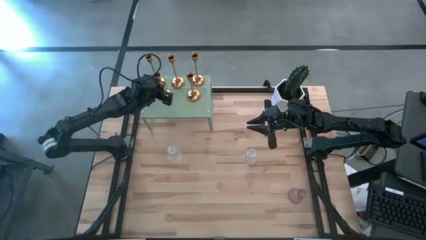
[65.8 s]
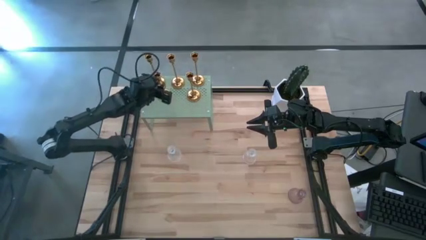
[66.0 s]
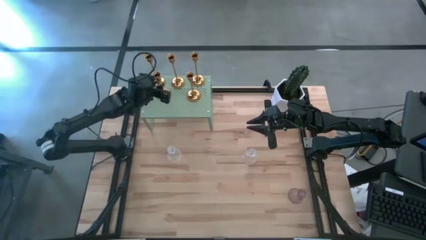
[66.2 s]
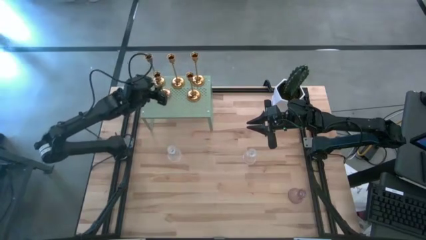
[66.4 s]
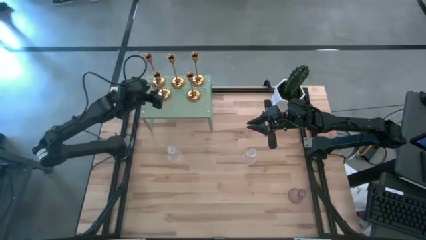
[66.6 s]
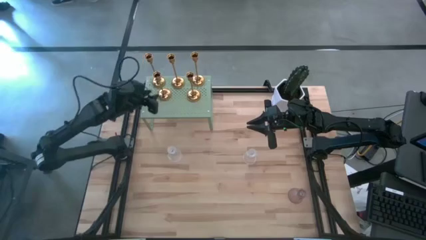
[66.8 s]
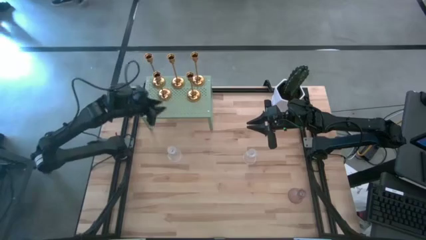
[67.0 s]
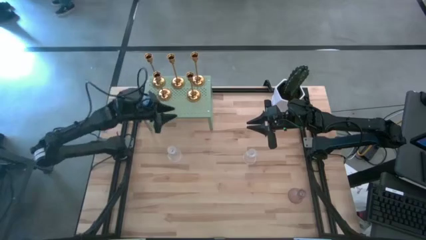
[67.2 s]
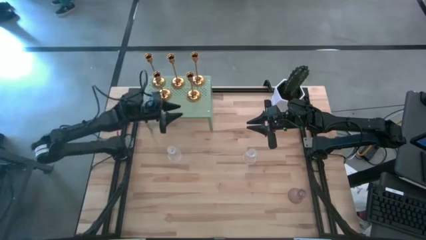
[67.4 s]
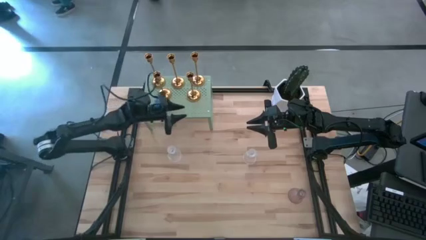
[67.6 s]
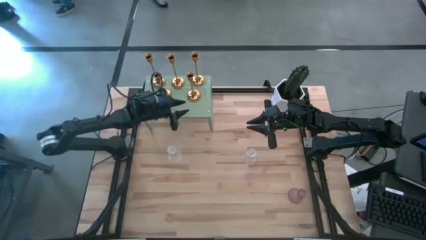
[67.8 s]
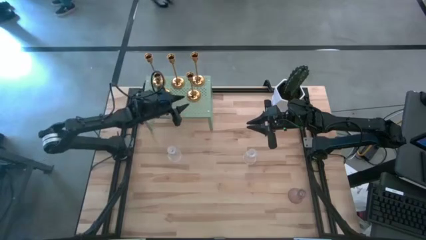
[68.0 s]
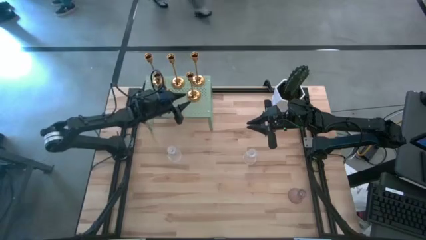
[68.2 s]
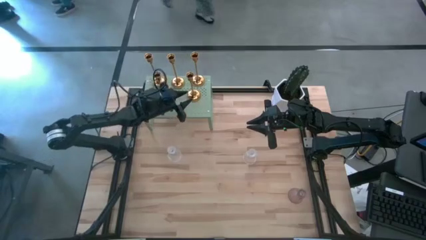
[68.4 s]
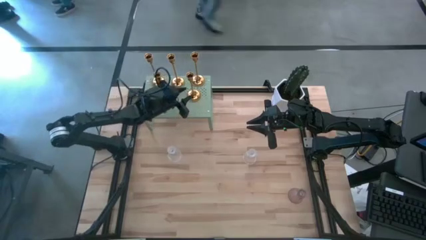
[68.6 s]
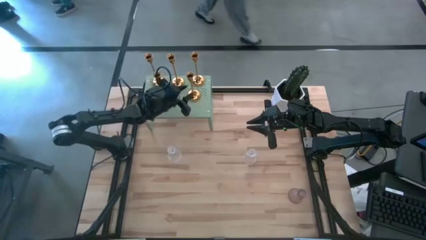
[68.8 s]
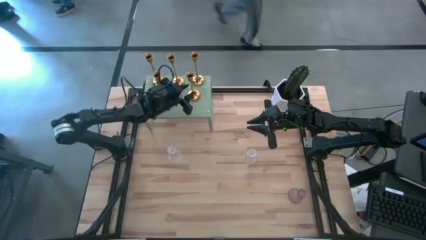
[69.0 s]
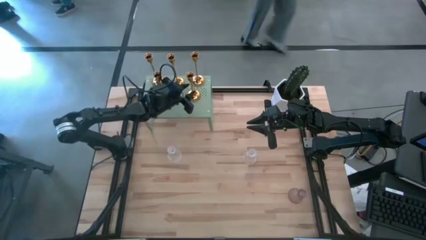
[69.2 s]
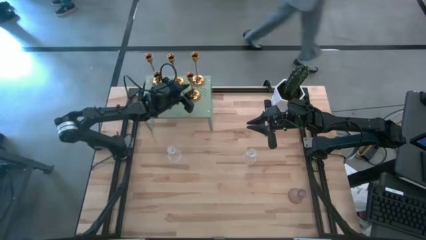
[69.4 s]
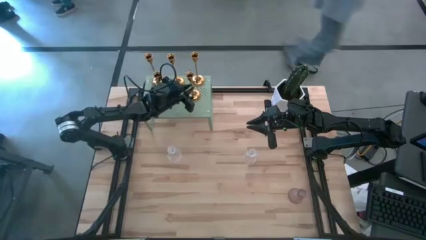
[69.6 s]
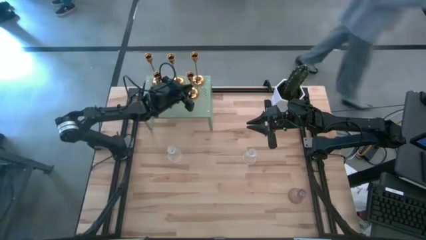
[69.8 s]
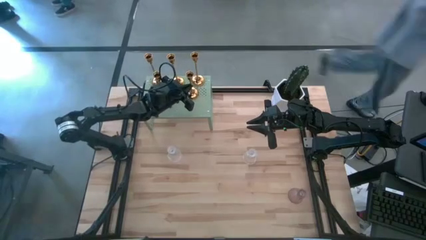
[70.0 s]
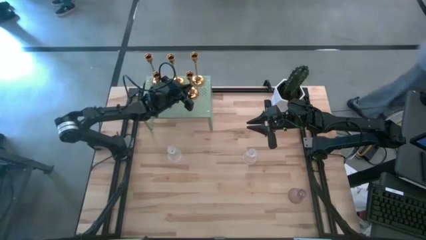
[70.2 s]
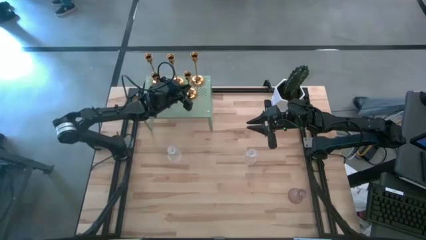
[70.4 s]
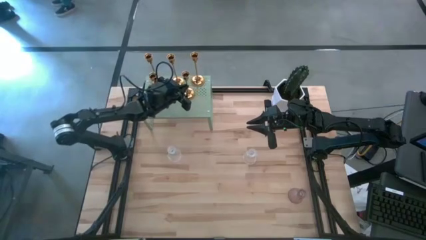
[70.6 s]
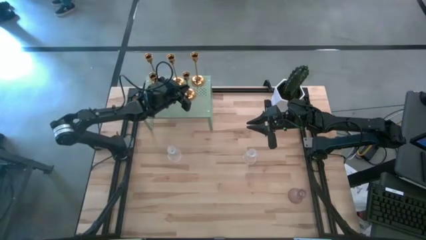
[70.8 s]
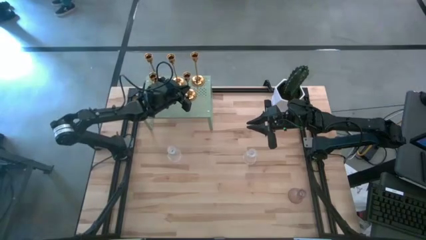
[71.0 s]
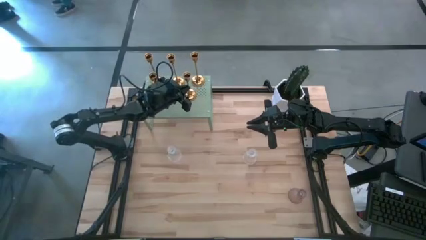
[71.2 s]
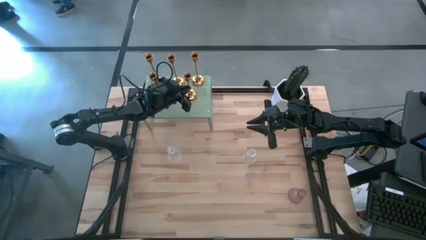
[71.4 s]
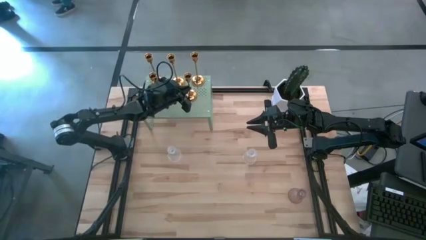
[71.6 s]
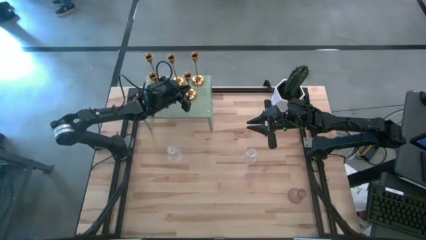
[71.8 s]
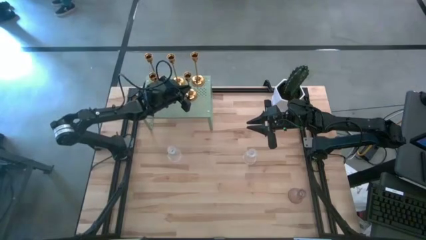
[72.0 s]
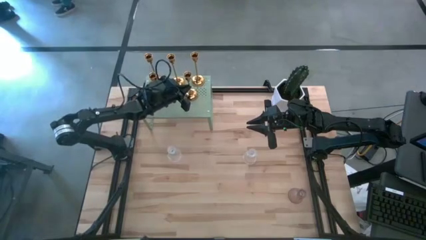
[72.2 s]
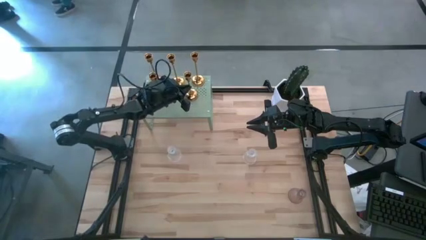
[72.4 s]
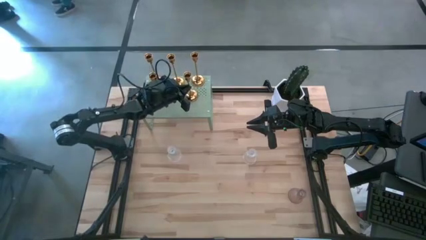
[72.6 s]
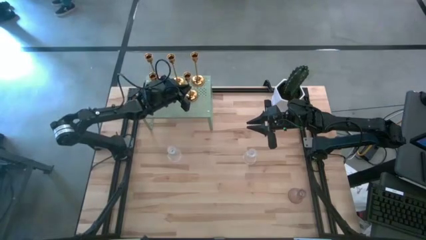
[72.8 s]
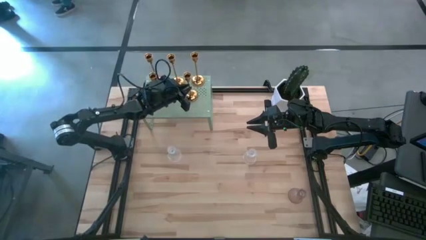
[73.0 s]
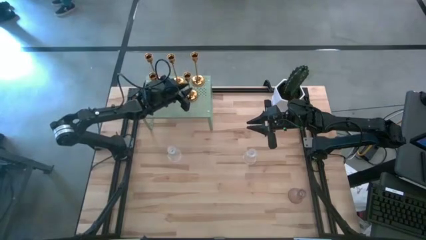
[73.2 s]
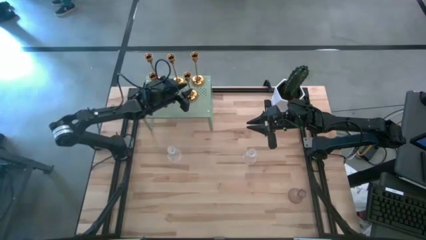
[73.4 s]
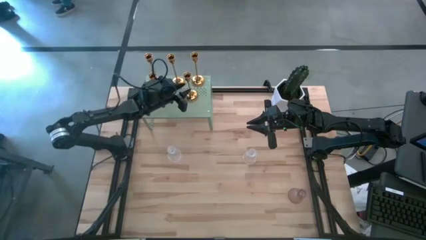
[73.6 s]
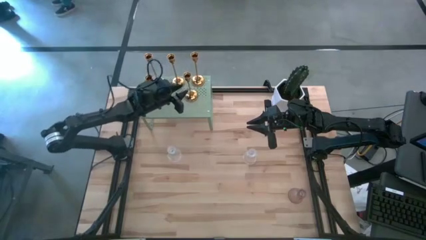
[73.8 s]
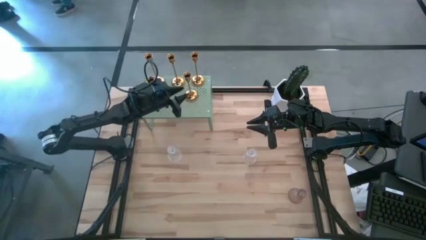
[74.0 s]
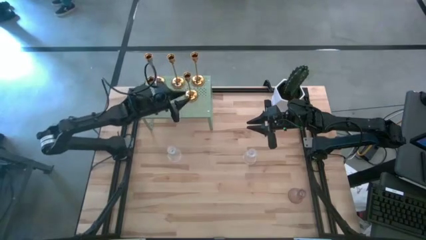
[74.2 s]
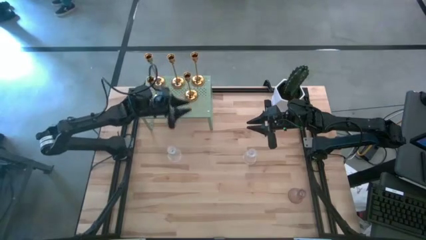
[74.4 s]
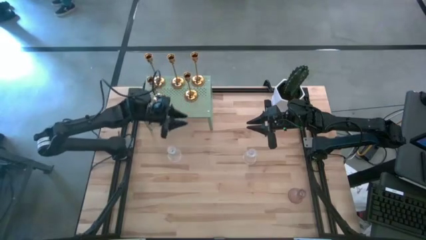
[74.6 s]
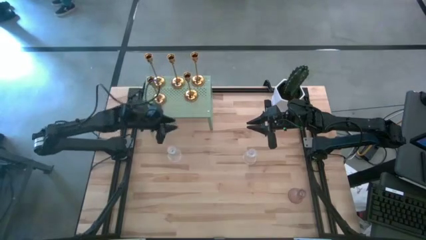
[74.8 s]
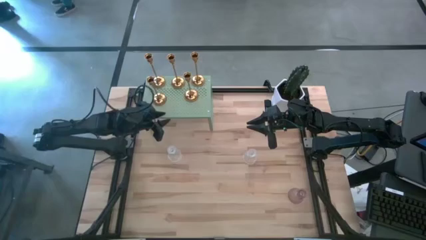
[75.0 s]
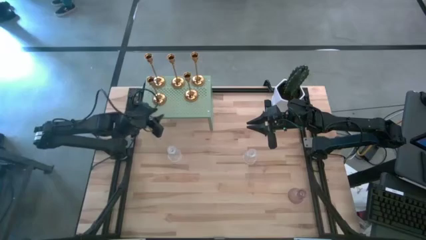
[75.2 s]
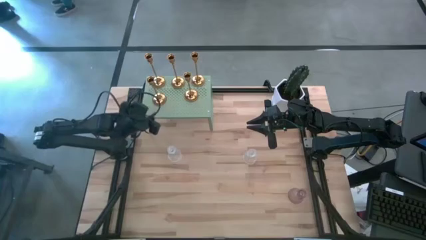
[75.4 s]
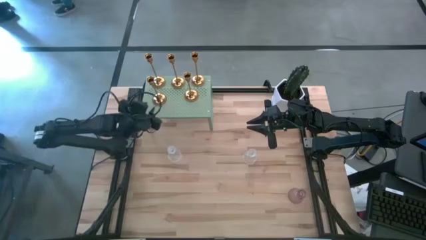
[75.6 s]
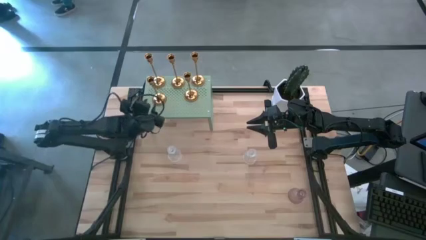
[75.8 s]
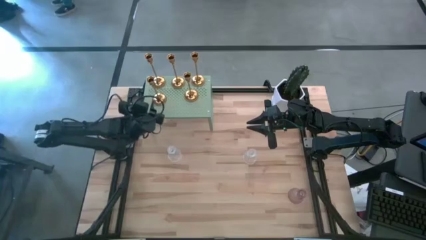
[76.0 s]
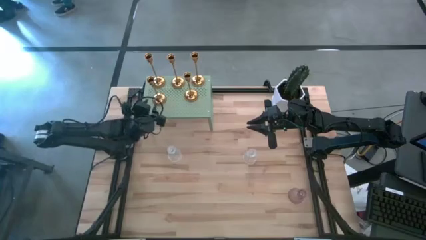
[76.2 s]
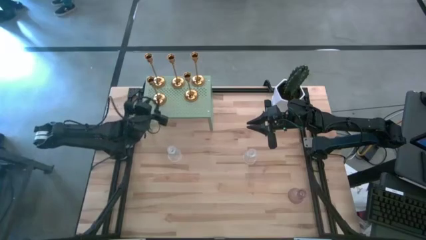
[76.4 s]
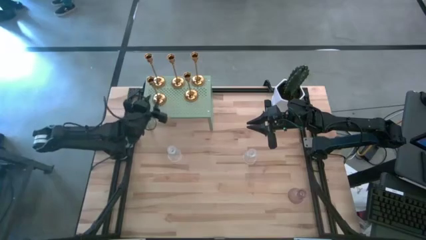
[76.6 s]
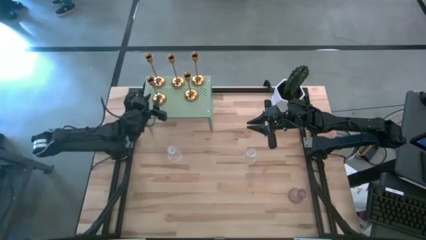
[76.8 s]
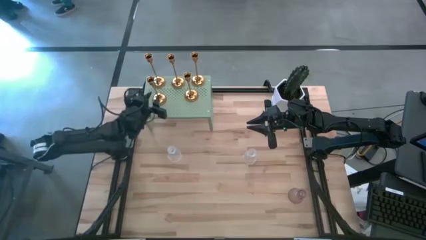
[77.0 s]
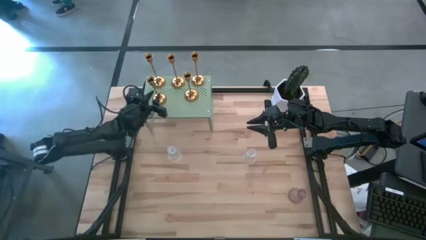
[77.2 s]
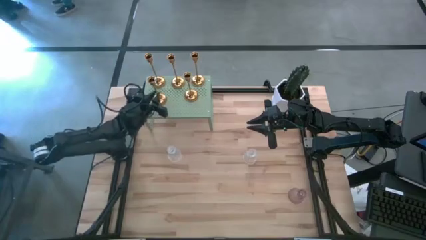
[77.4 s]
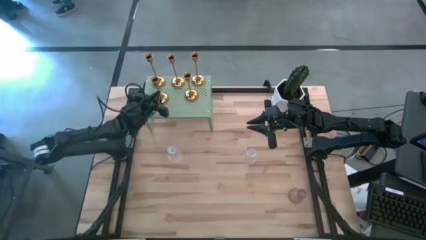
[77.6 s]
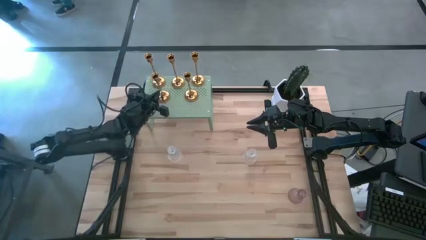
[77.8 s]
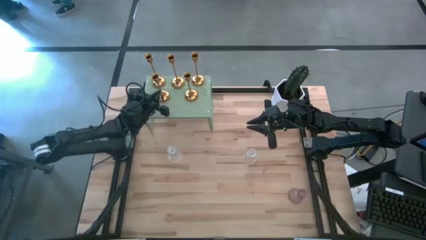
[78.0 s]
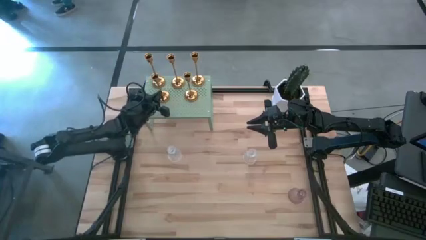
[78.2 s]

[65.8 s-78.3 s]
Task: Pick & Place candle stick holders
Adjust the candle holders on the shelf
